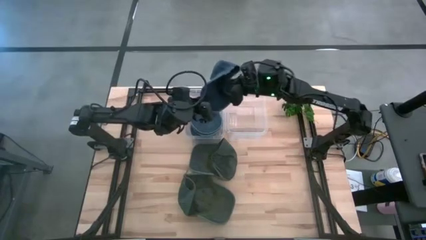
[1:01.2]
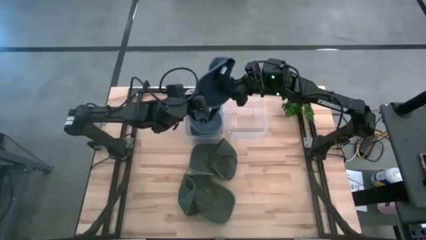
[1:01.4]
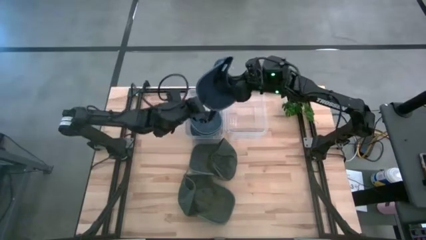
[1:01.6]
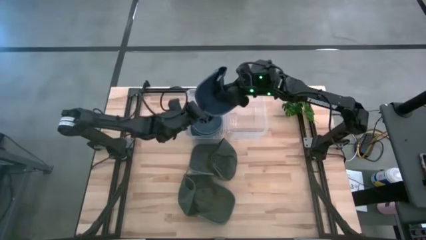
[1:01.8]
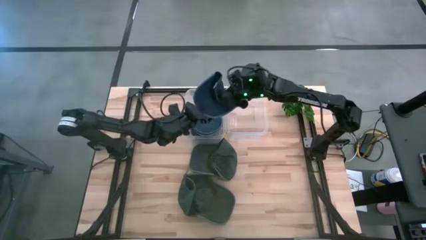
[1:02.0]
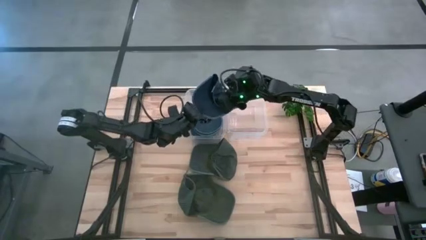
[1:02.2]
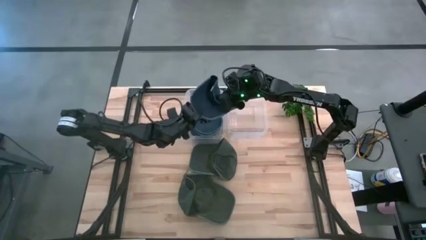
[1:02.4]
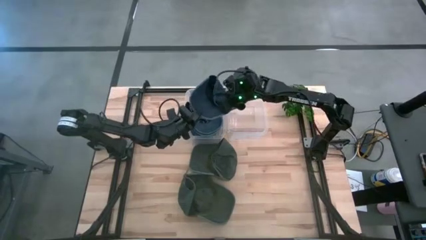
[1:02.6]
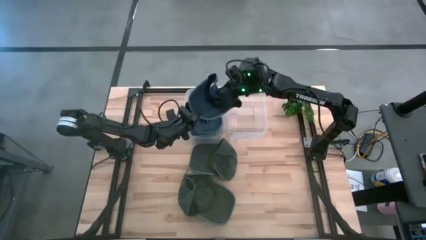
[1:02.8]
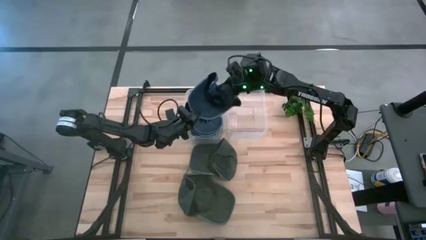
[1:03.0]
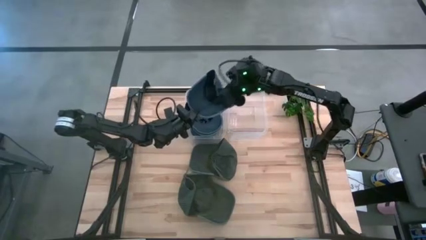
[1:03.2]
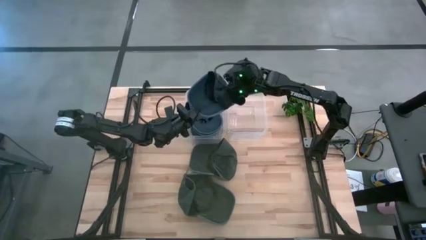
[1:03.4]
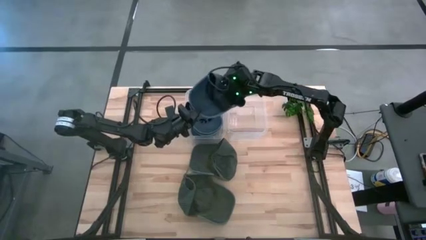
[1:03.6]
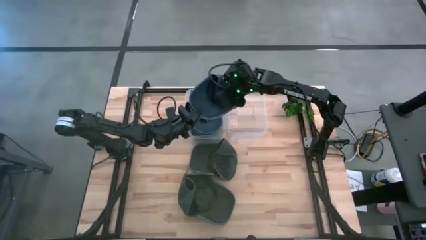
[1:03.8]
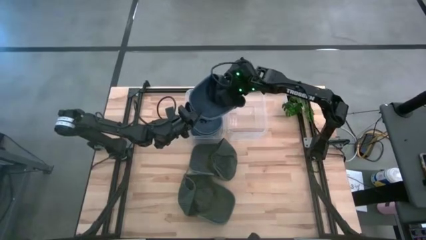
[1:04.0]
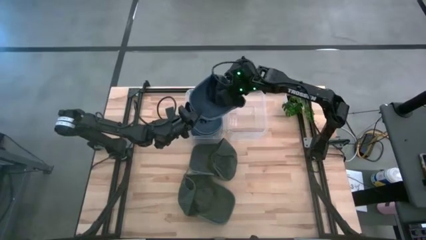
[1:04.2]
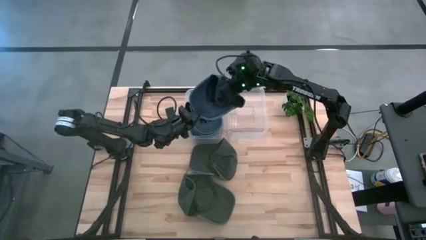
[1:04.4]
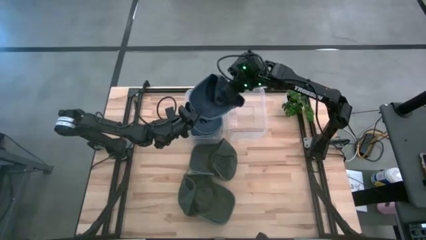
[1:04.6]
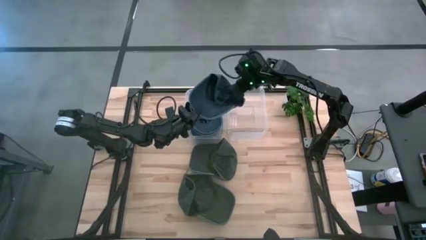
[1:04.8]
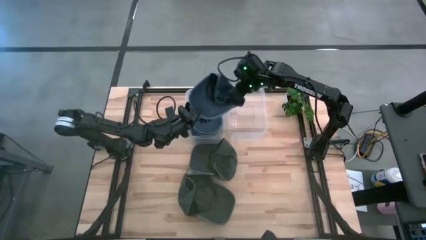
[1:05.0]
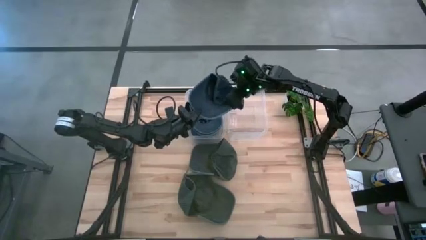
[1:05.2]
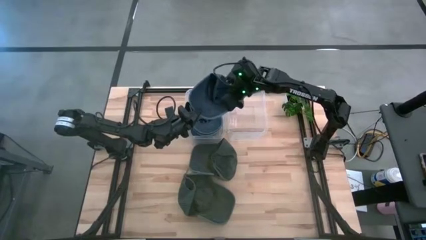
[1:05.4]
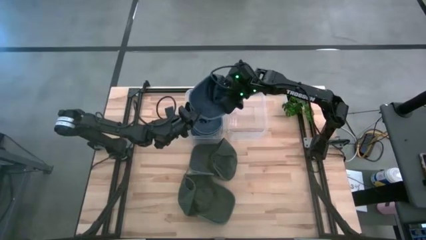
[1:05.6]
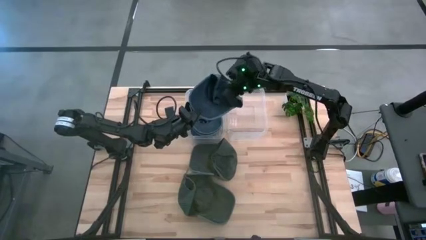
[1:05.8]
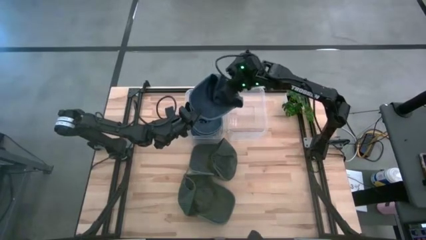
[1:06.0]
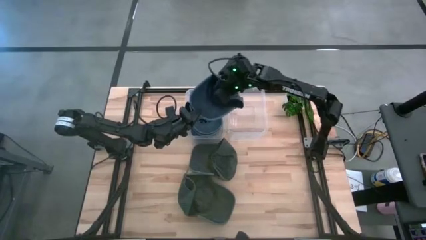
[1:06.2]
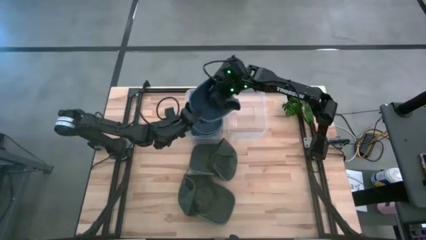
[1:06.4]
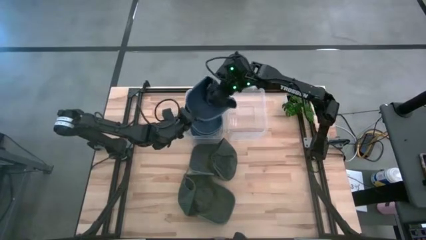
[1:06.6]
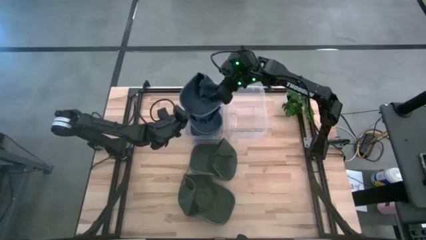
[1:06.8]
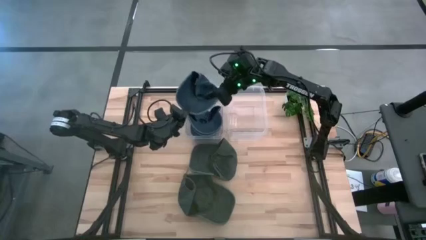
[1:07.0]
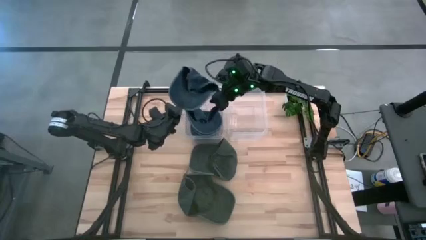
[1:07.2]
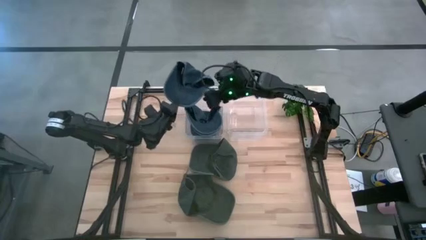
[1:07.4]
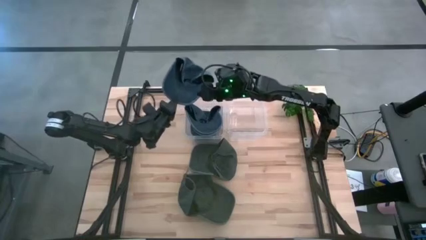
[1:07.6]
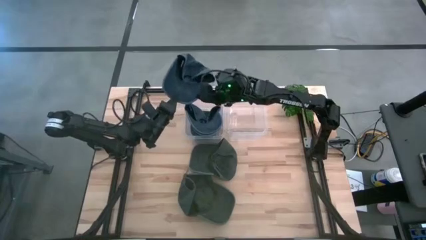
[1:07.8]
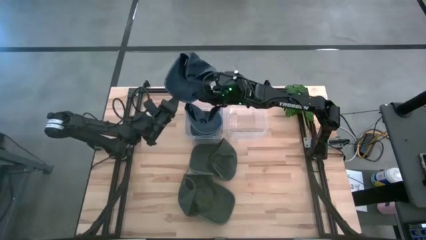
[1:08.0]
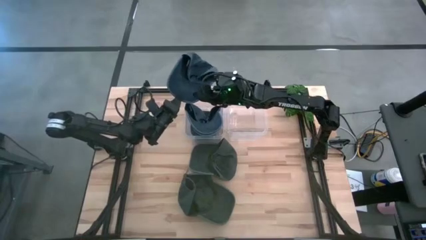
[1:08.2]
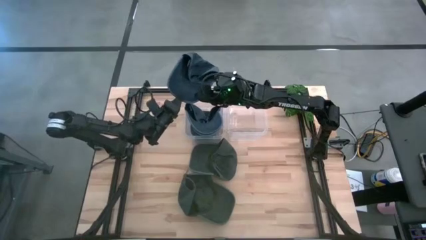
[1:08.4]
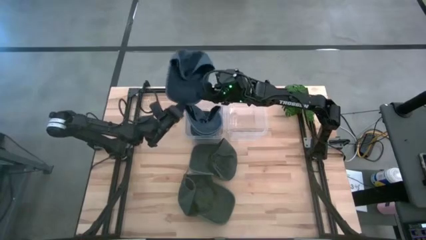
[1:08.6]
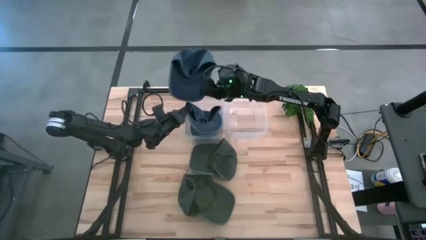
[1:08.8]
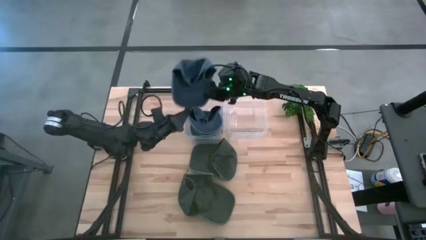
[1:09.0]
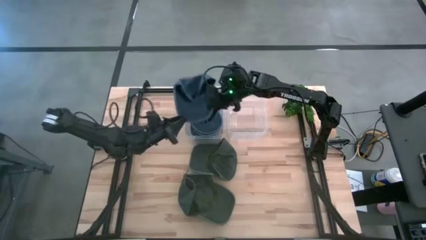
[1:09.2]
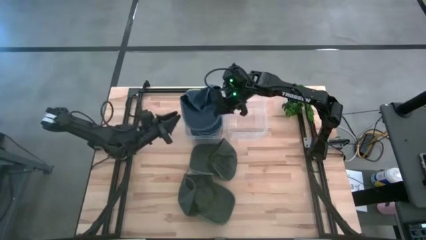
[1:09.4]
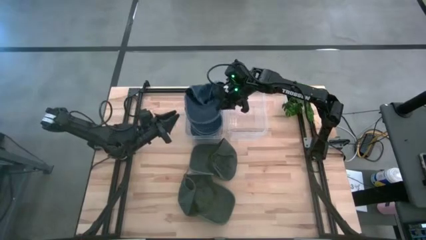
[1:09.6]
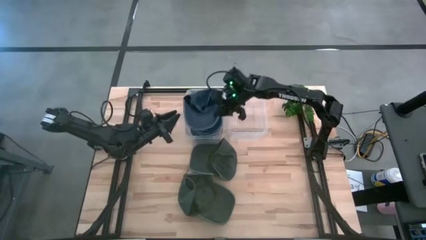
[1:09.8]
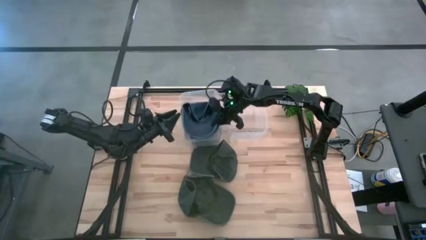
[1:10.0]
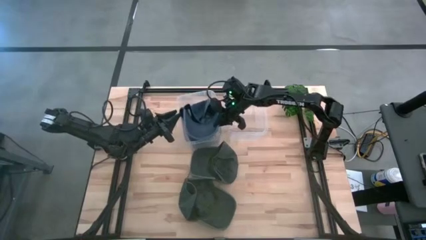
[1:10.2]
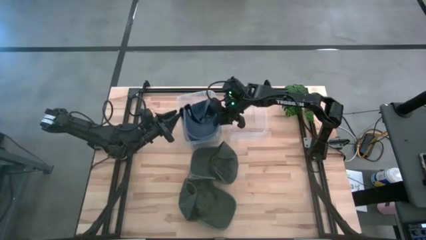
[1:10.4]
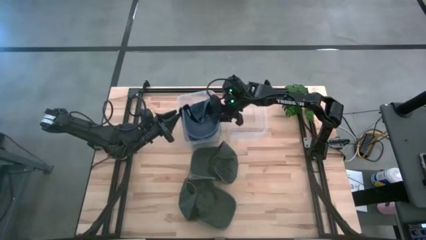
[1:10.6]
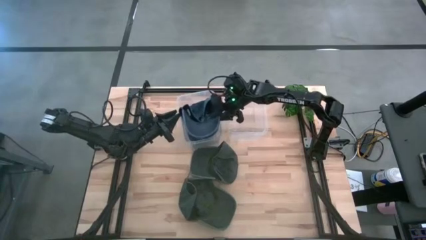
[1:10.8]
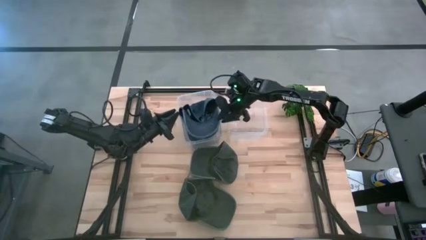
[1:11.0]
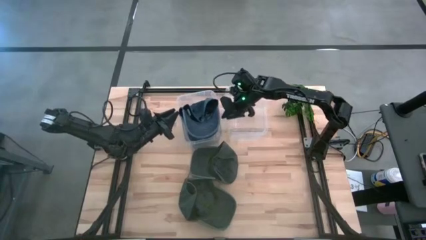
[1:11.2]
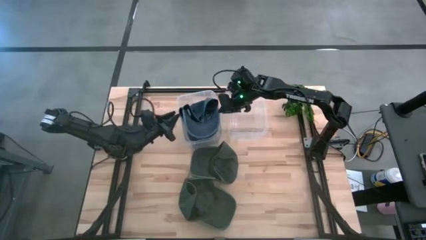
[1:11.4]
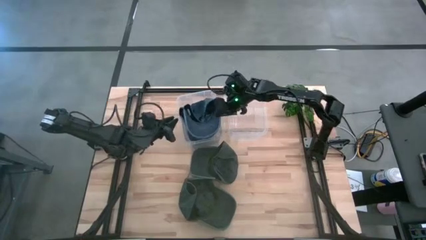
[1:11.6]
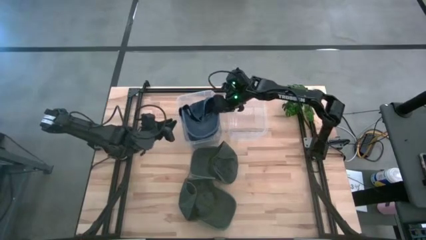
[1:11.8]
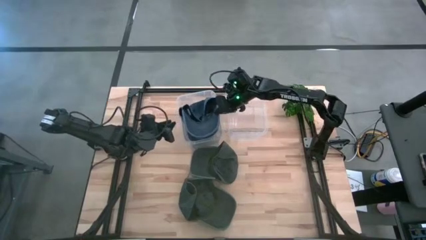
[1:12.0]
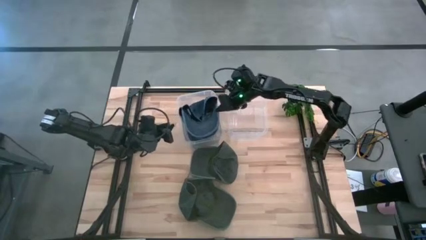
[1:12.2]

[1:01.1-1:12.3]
Task: Pick & Place hat
Put the blue cap into the left transparent bin

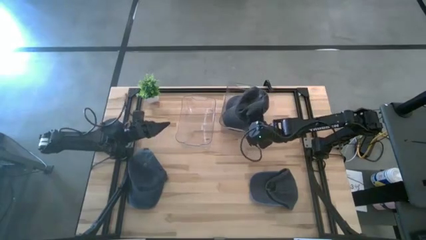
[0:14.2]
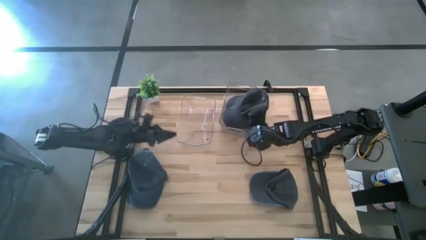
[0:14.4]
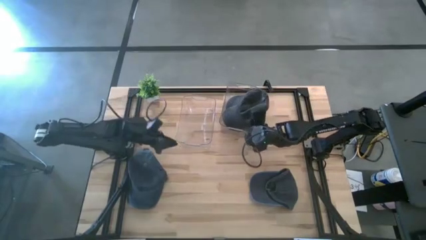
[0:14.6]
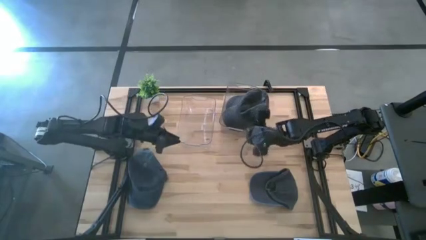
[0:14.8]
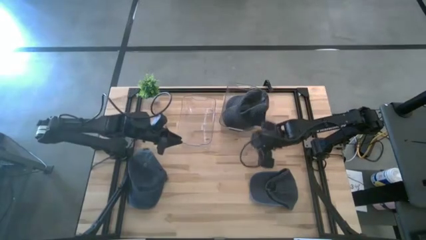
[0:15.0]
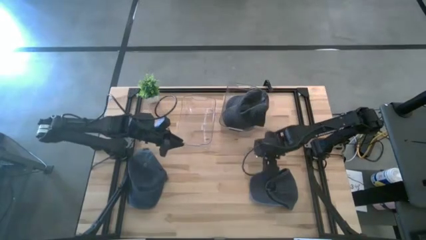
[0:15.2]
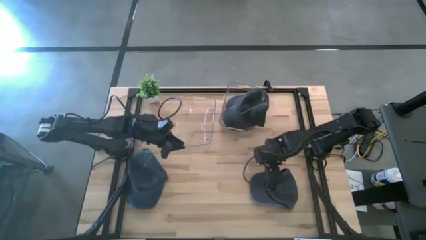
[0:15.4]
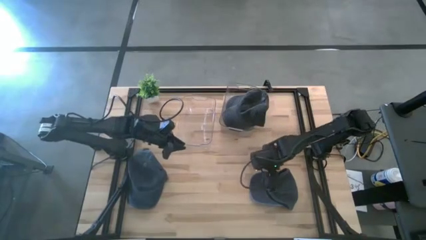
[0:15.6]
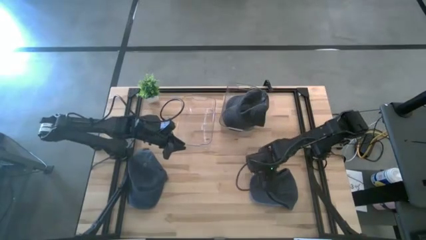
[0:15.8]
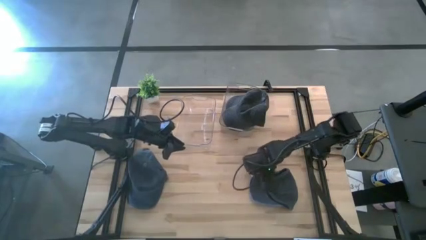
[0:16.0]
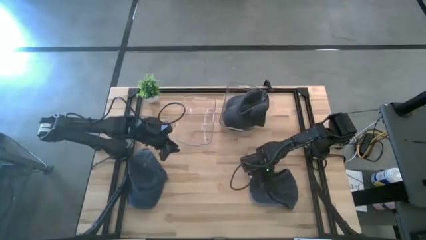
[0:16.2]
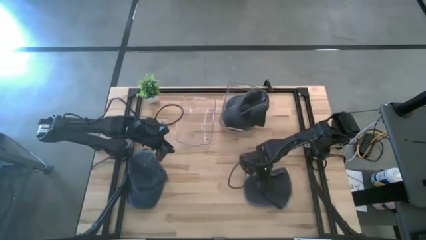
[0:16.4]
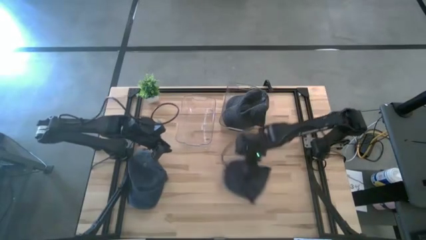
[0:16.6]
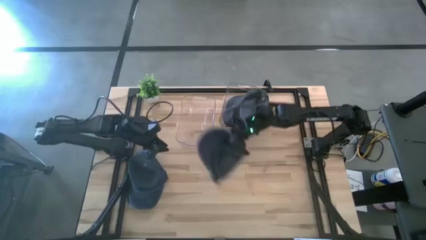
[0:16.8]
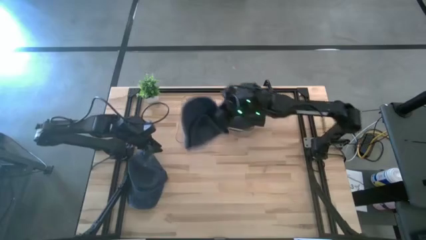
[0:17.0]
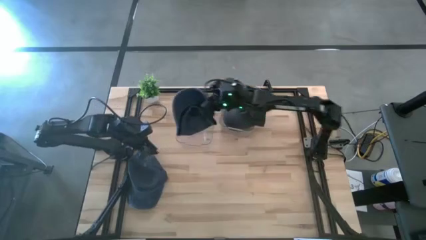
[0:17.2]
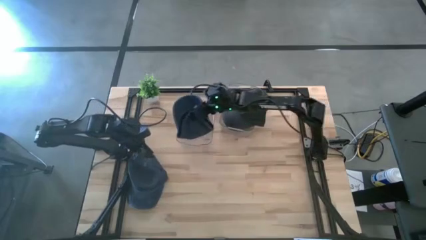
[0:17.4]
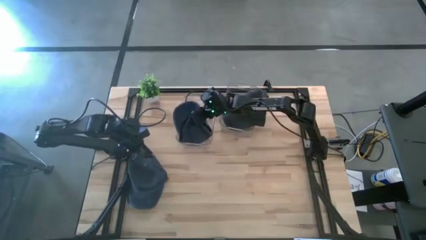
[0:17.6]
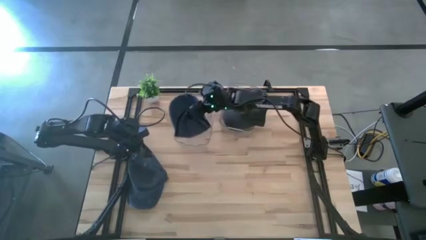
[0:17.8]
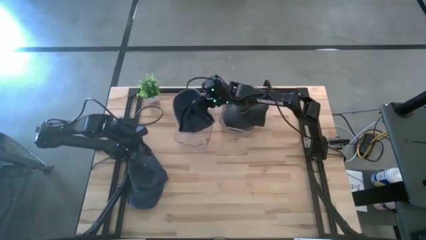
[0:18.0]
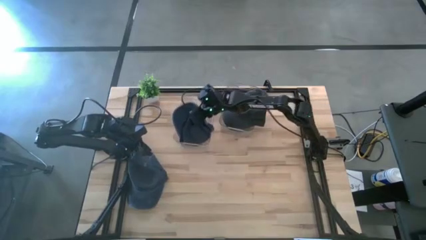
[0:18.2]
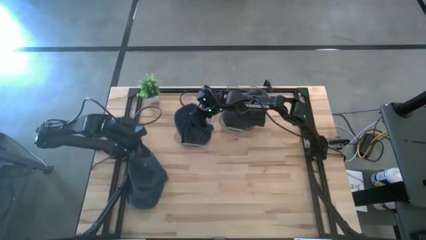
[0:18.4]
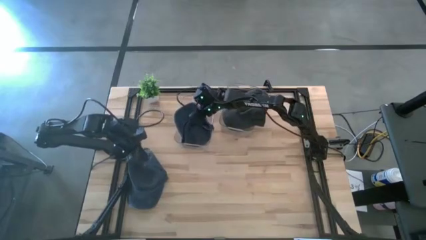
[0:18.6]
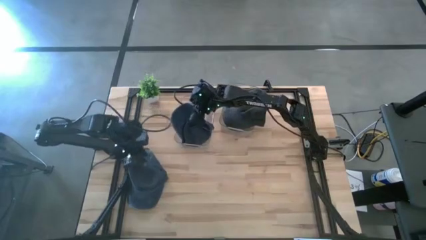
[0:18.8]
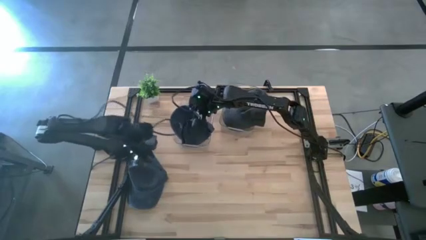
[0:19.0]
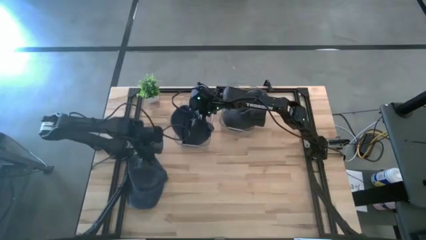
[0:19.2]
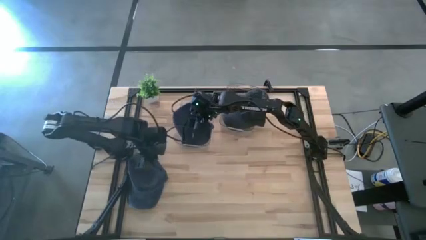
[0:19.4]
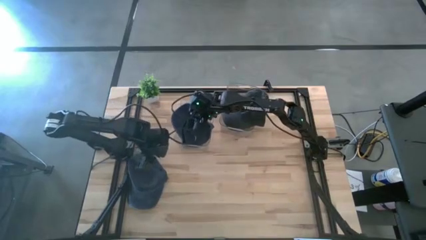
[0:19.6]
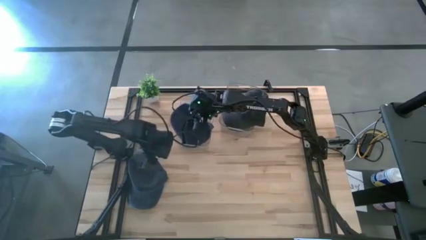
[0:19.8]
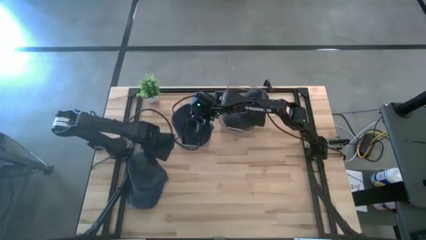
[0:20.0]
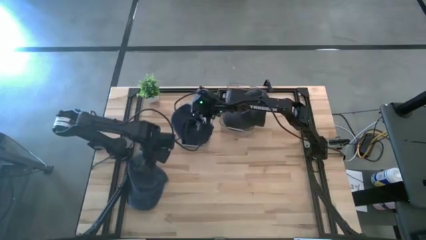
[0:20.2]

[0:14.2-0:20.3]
Task: Pick & Place hat
Put the right dark blue cap into the left transparent bin
